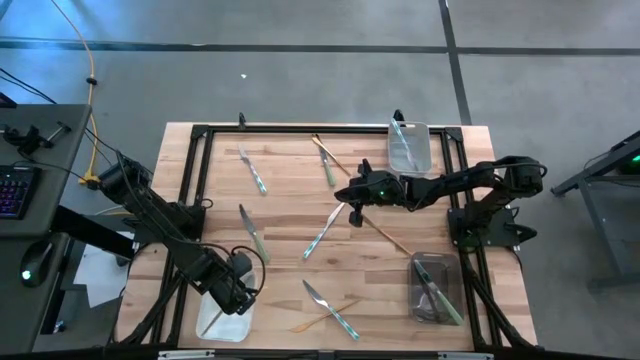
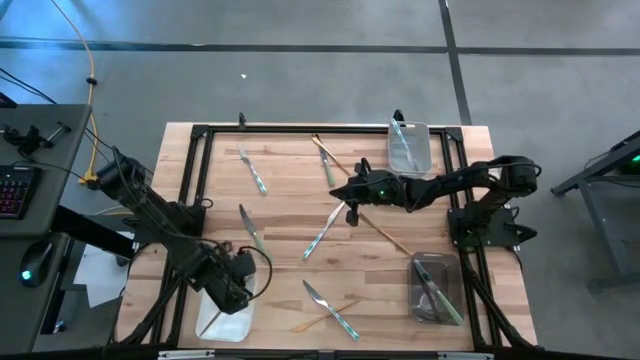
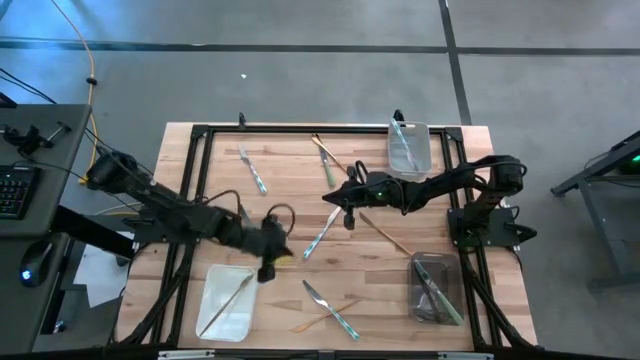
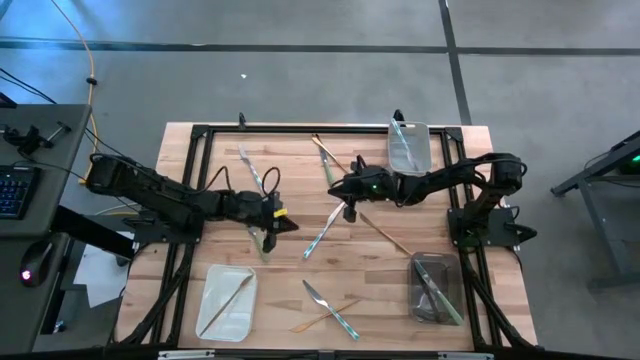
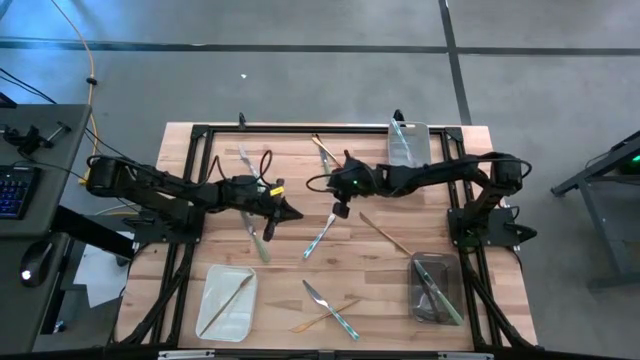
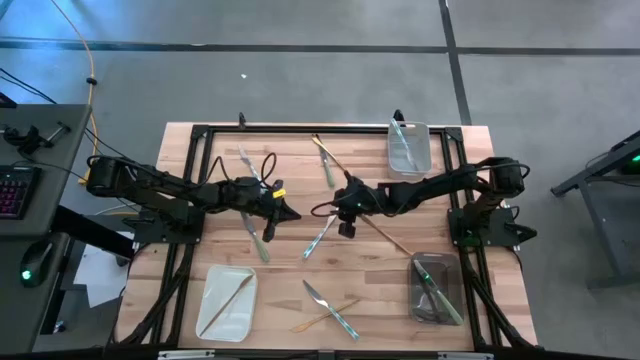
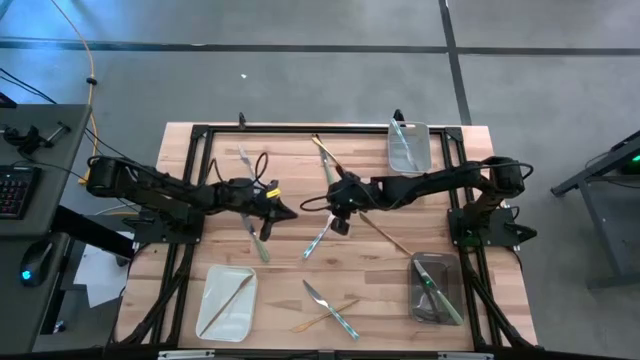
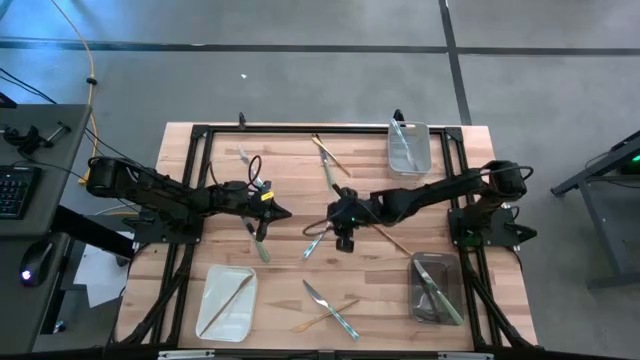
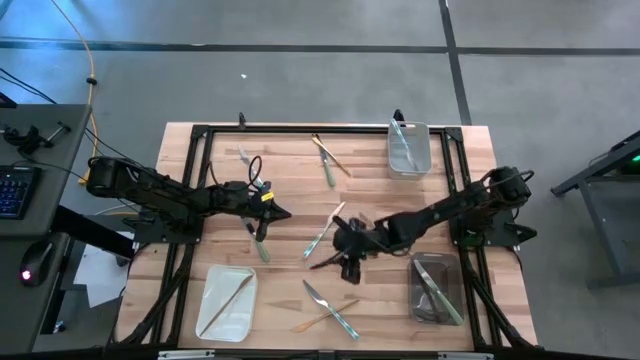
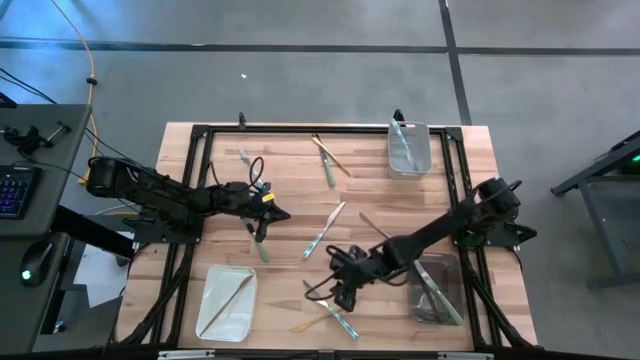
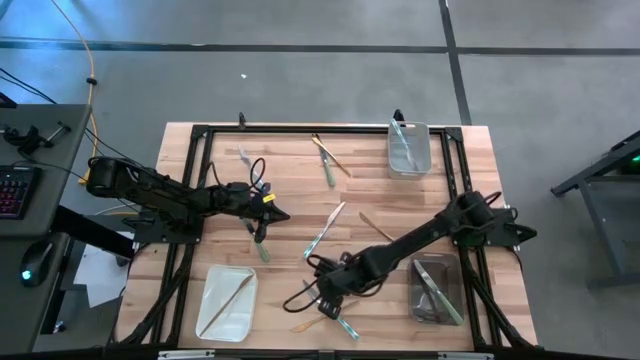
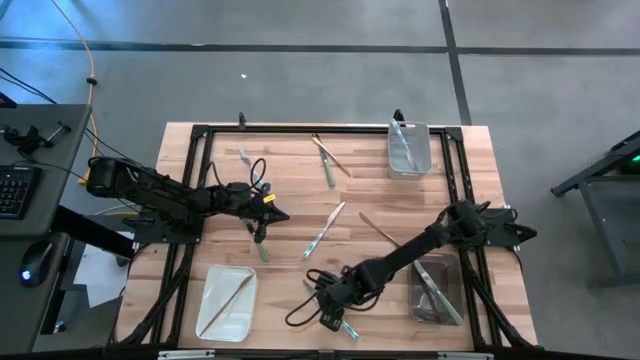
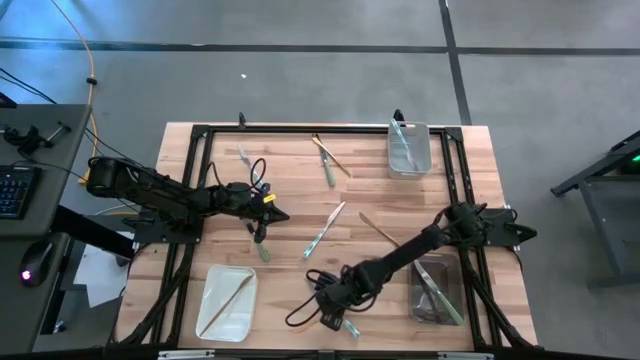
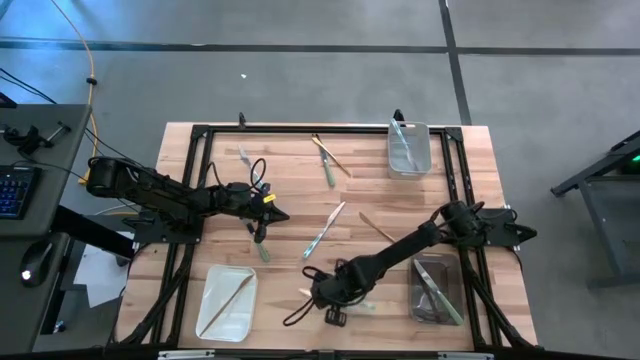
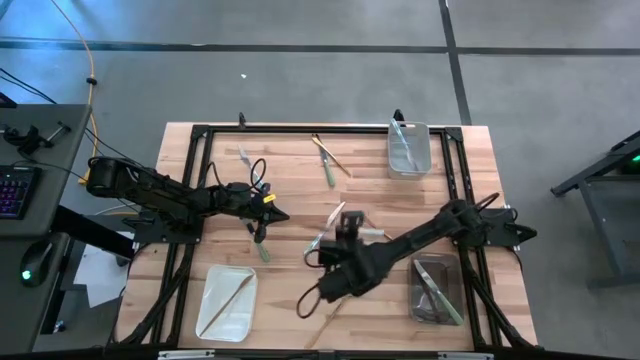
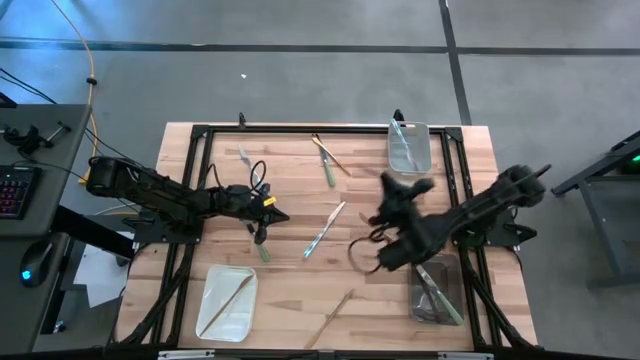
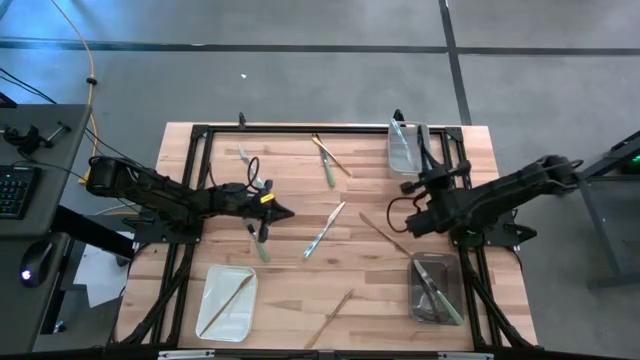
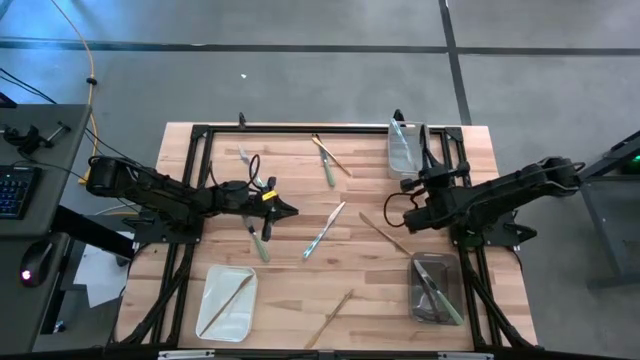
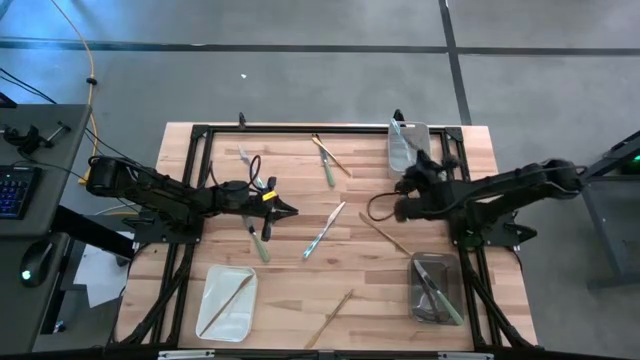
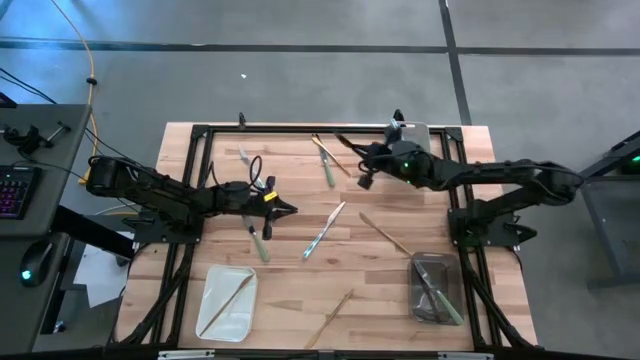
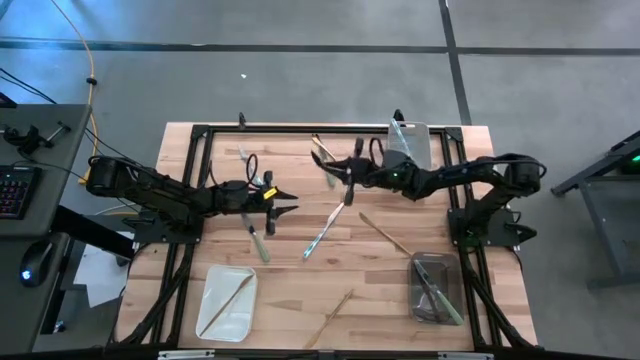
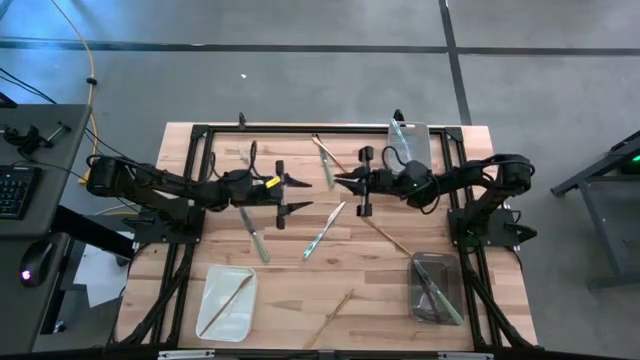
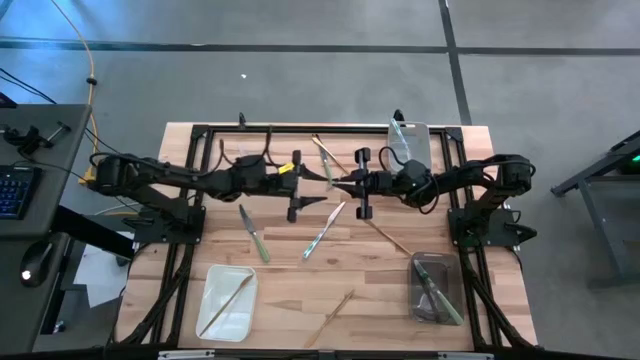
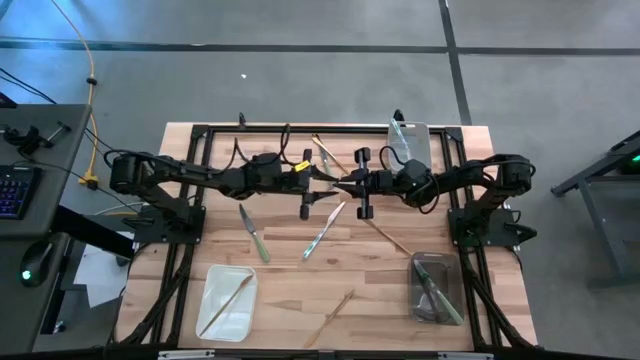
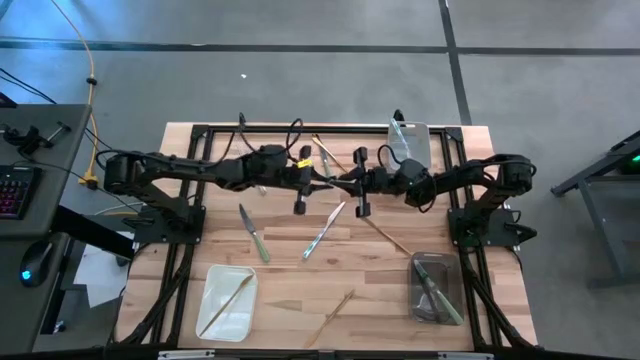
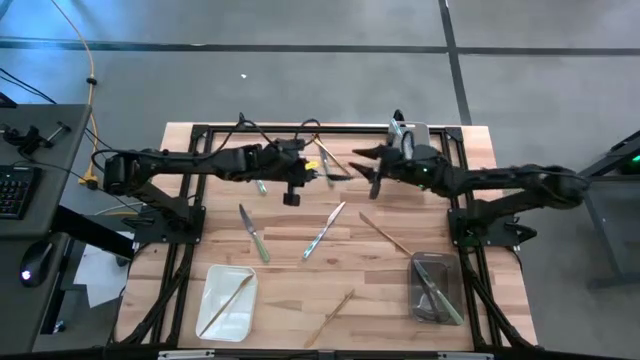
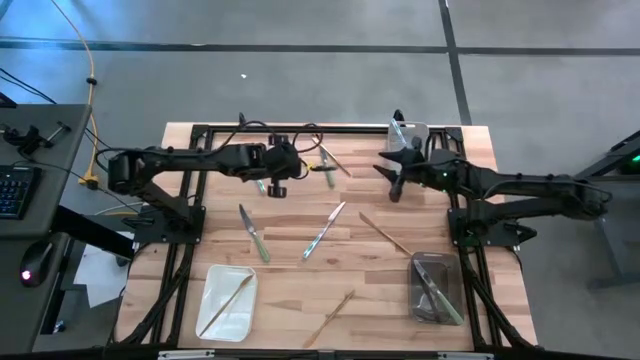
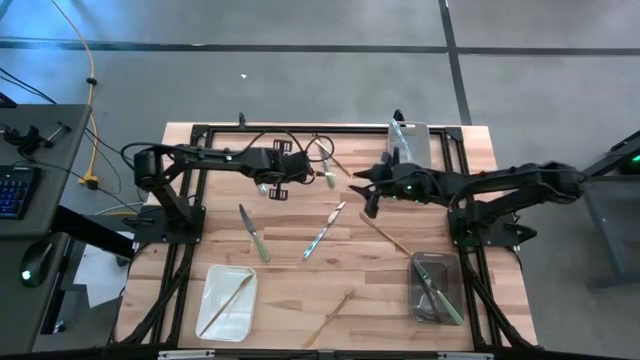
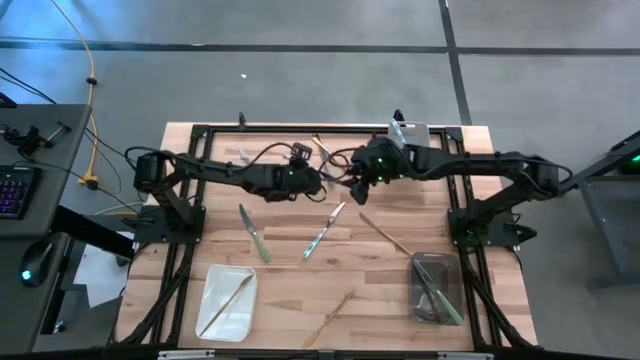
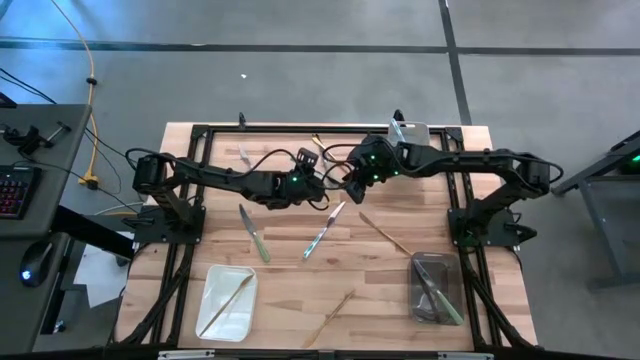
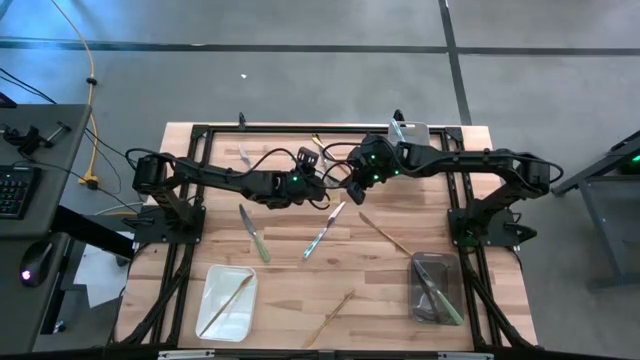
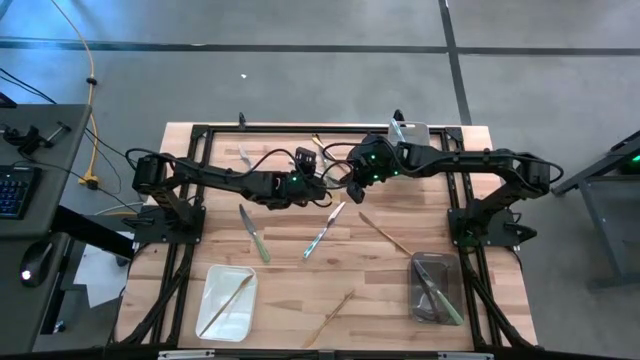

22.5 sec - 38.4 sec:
Task: Sort silverware by color (type)
Put the blue patterned table knife into the gray bin

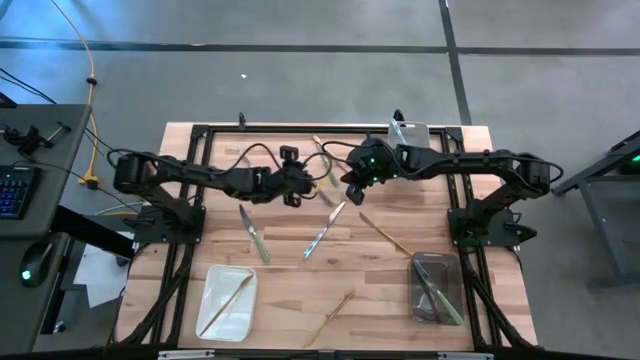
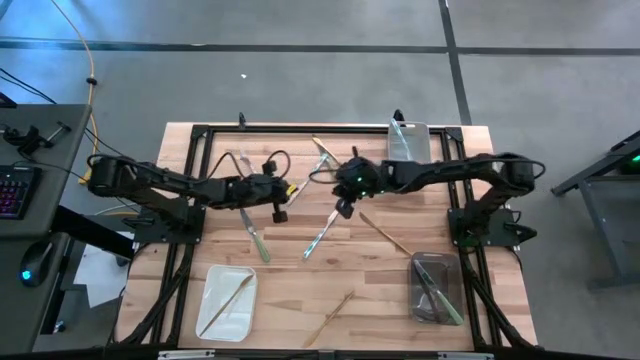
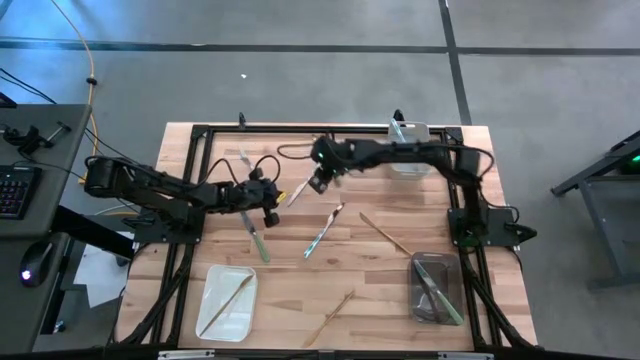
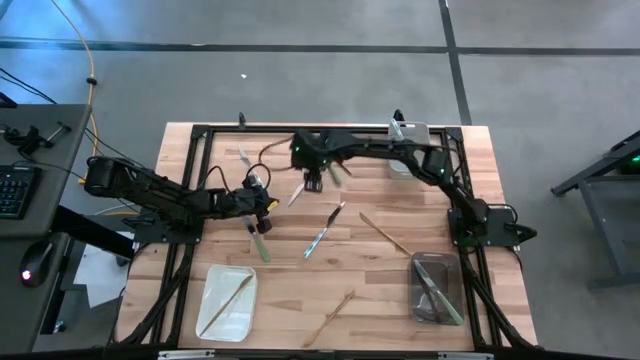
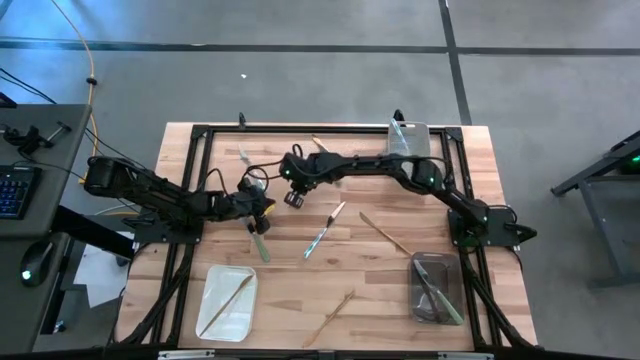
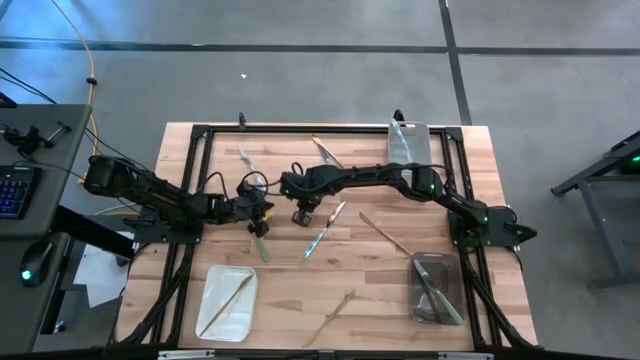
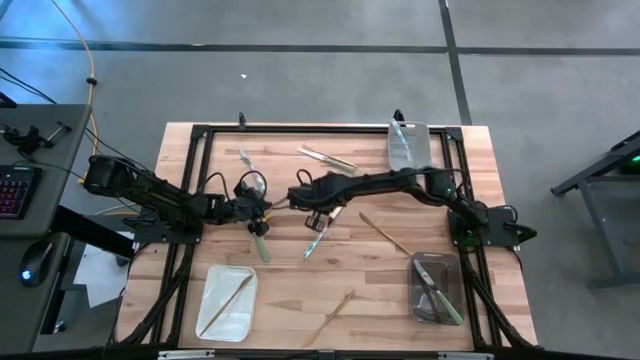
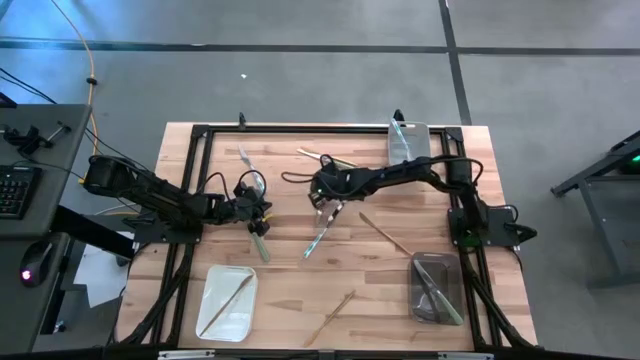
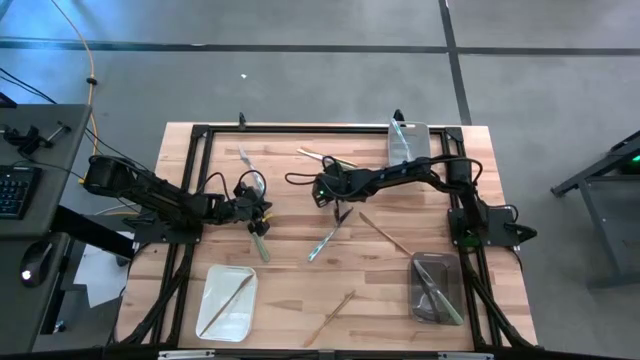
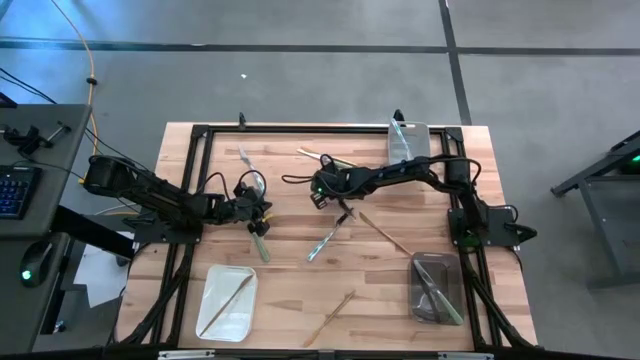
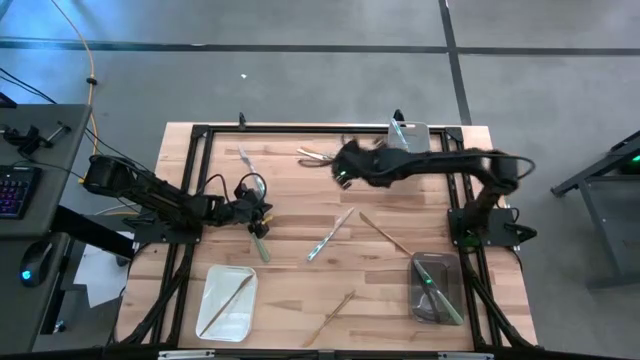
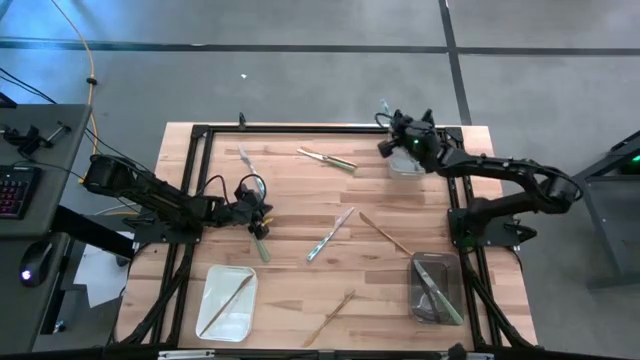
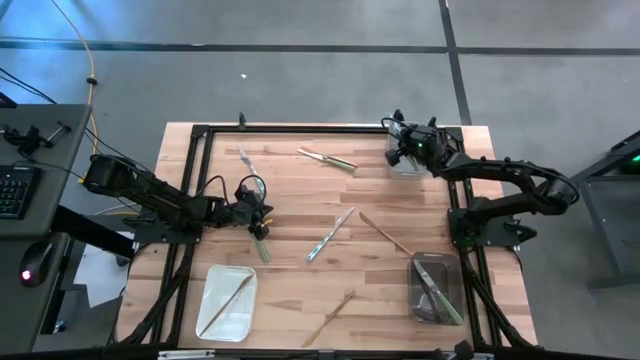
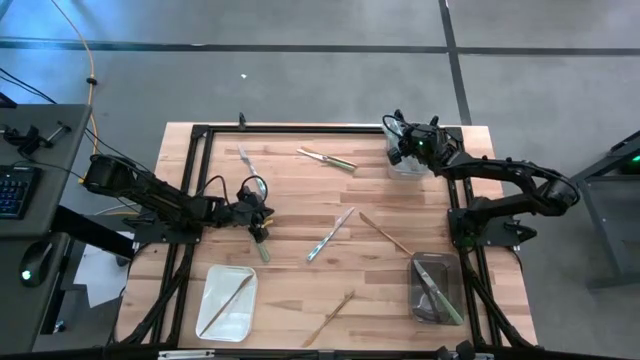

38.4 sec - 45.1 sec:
Put the blue patterned table knife into the gray bin
